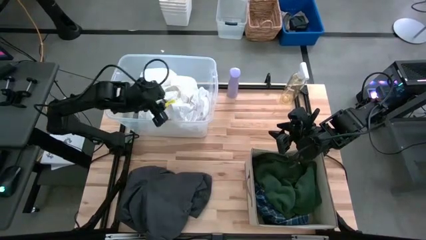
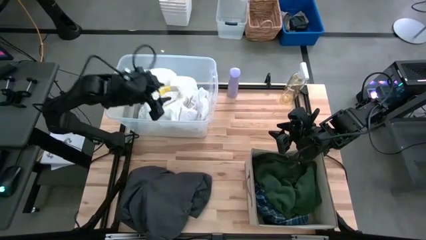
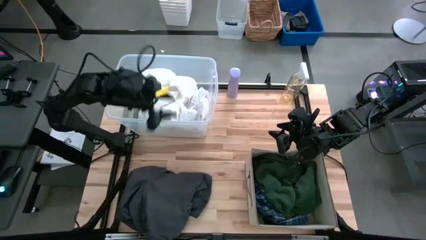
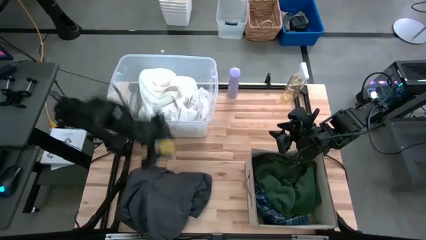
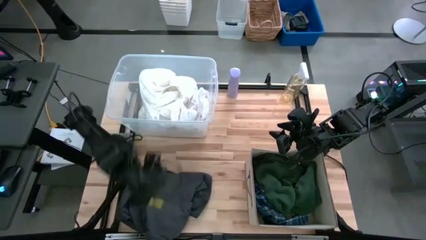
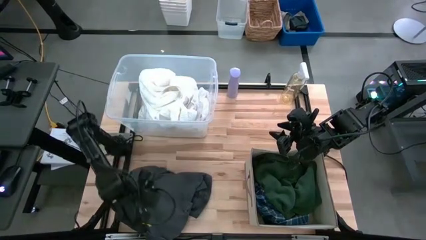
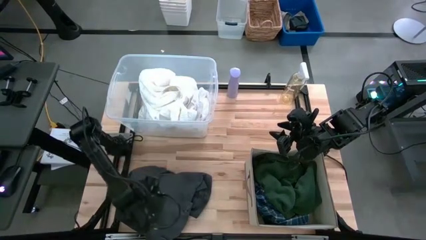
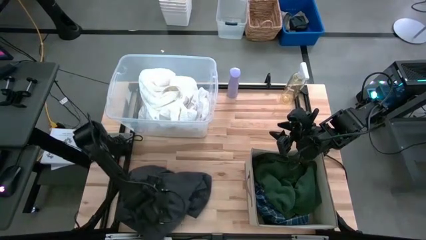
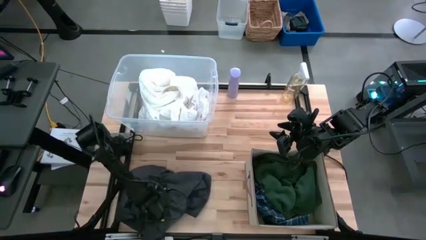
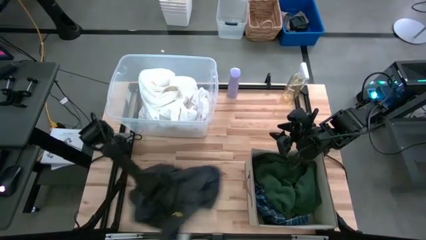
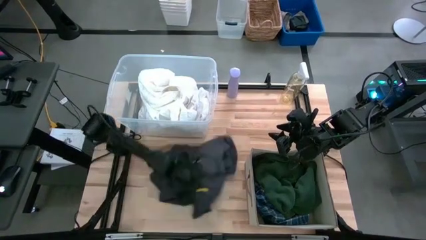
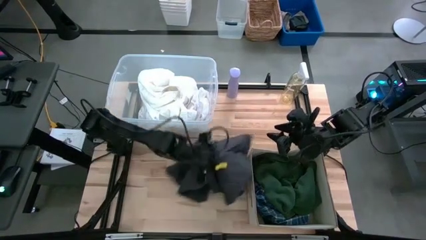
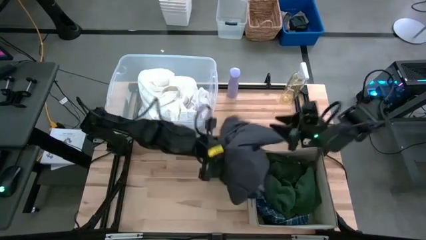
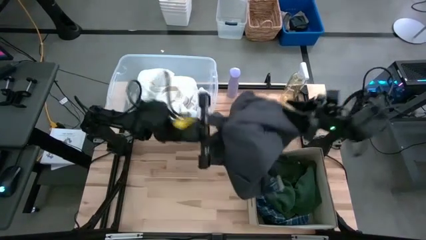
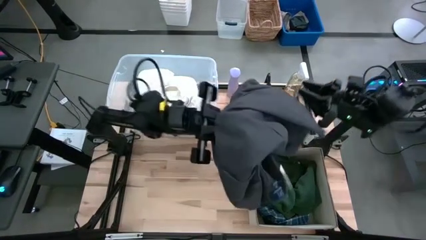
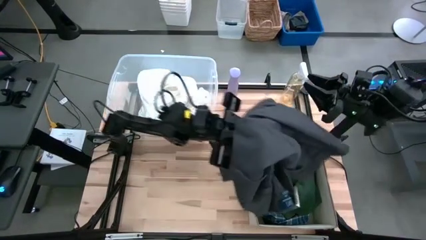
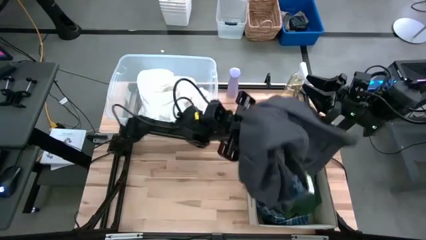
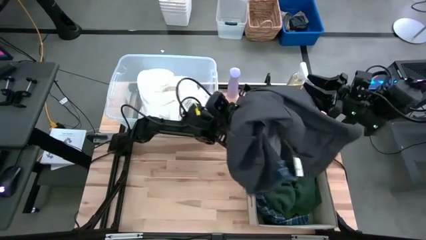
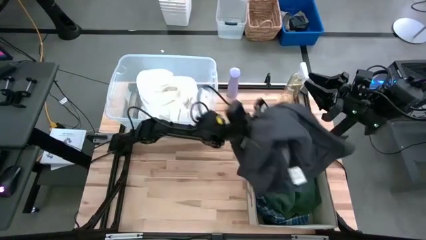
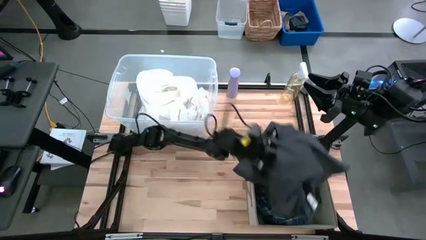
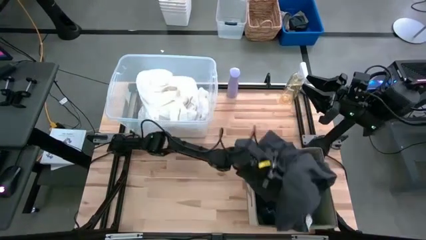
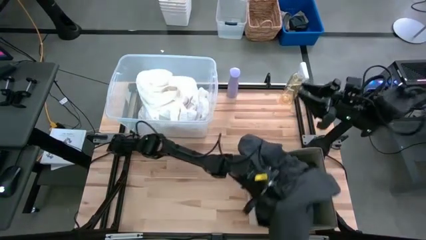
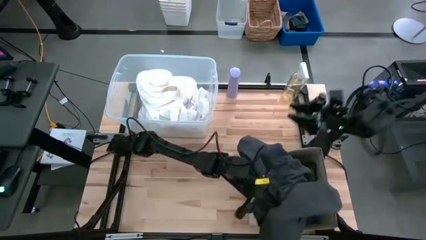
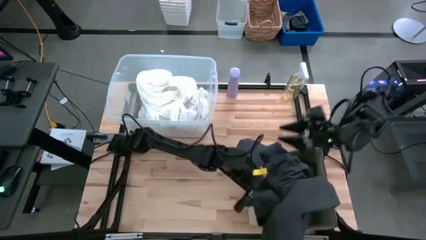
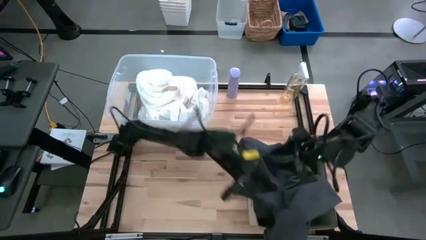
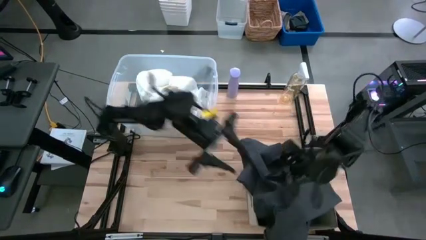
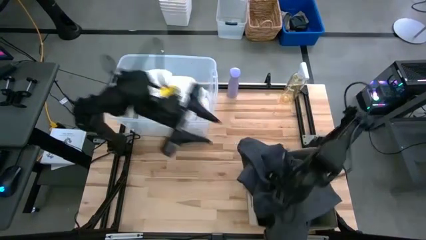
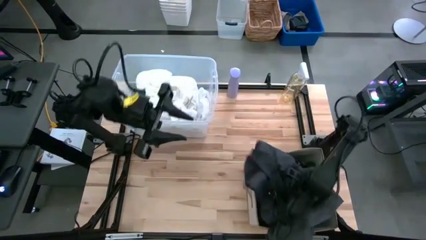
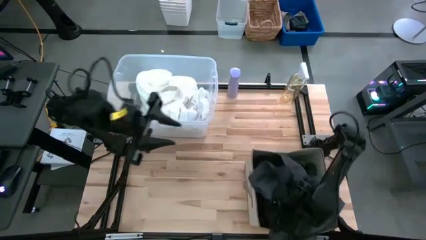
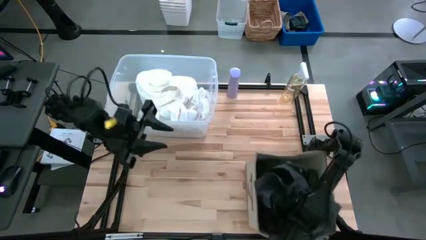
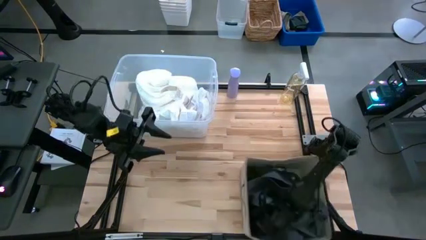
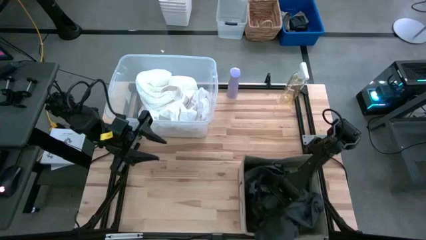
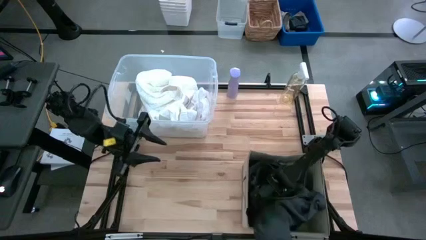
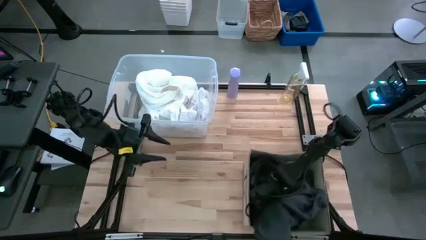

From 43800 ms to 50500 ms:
Task: Sort clothes
Put the black long sleeve into the laundry bin

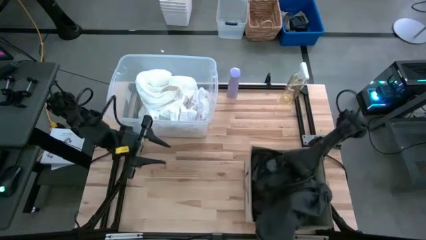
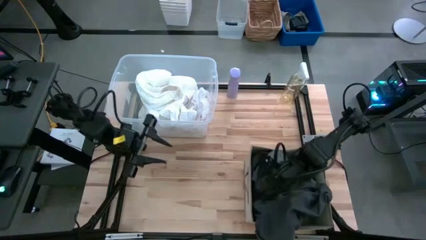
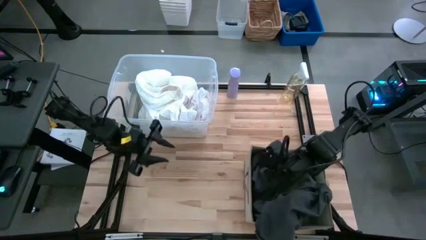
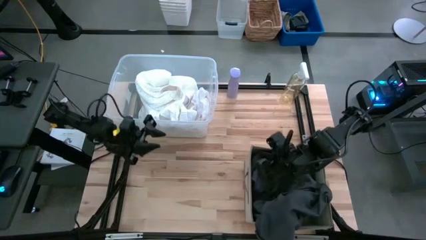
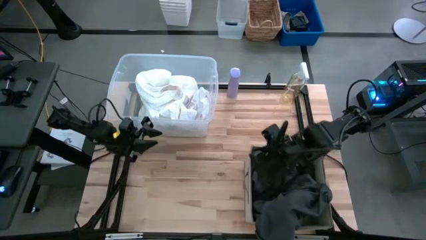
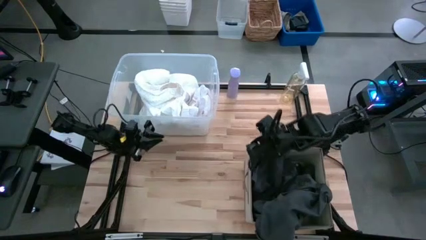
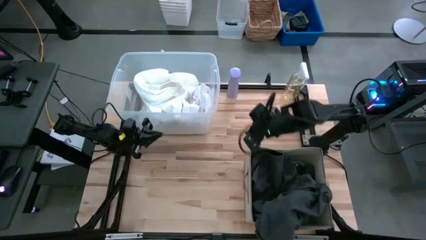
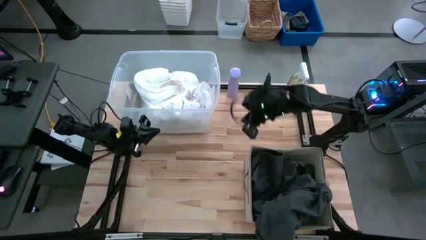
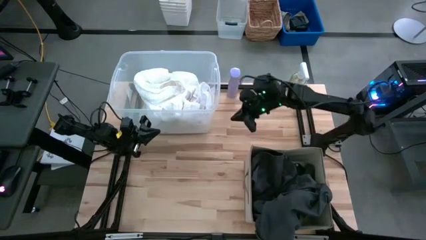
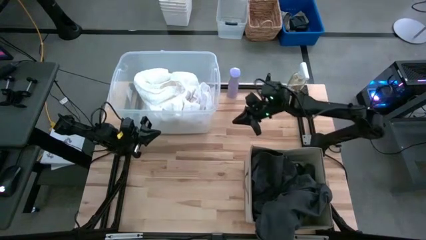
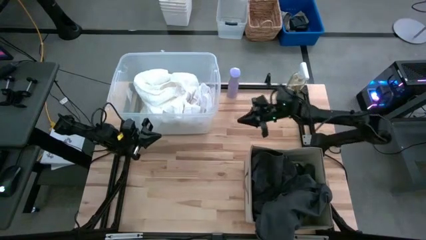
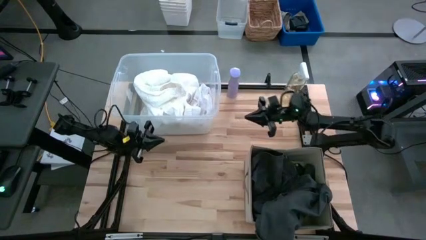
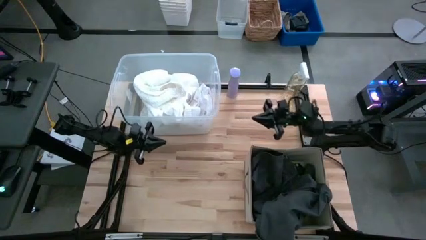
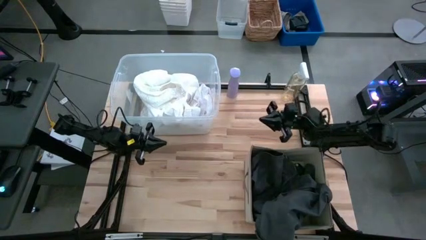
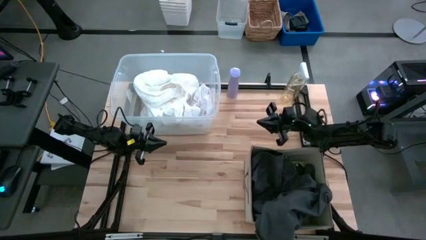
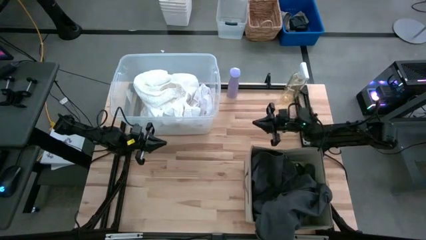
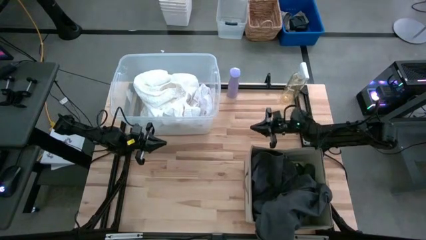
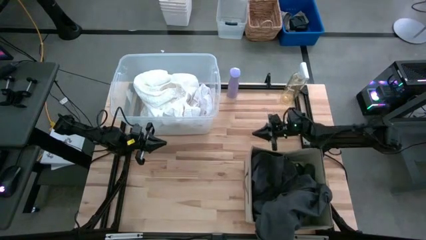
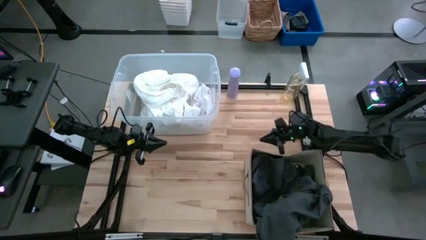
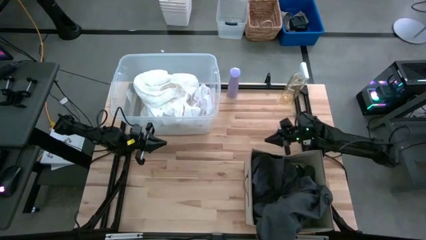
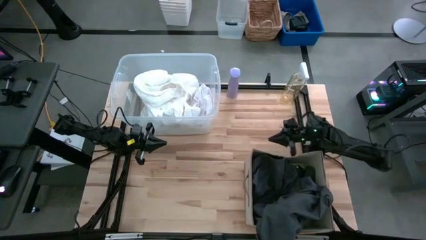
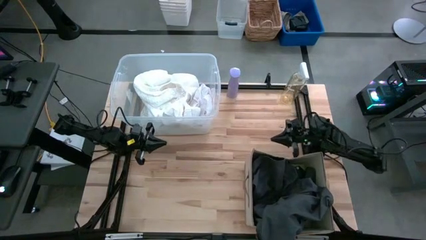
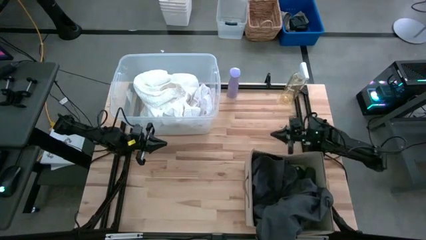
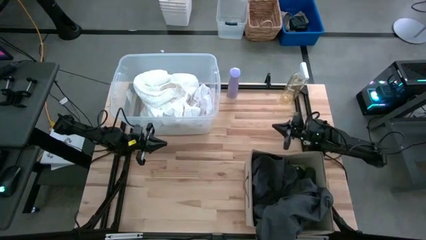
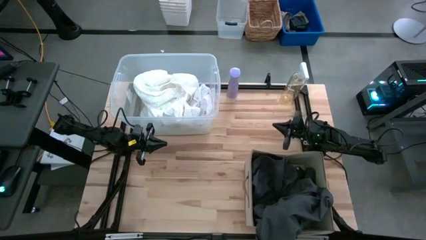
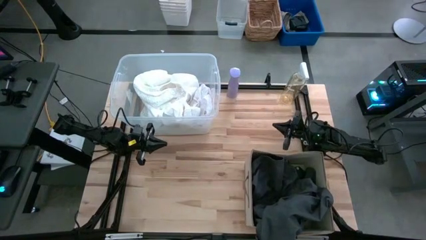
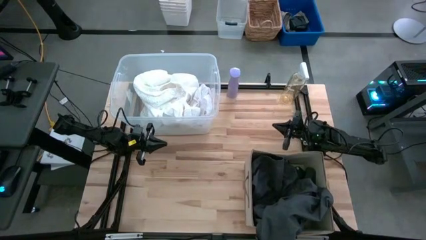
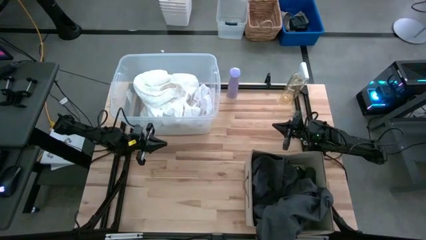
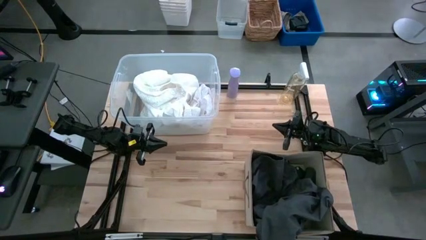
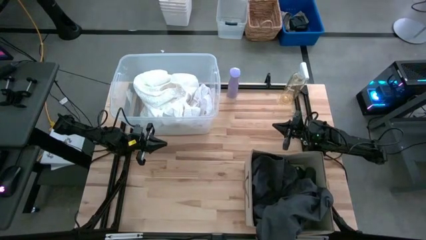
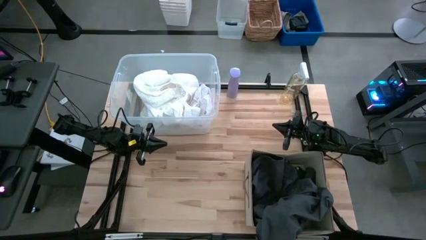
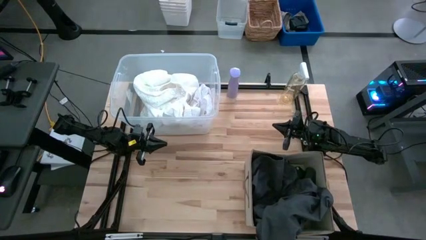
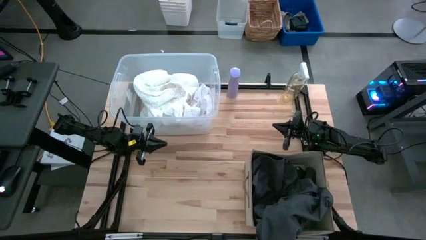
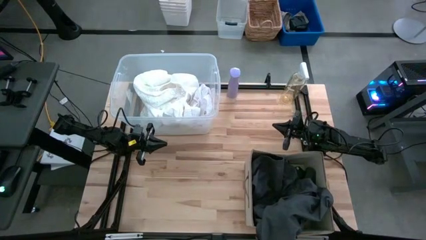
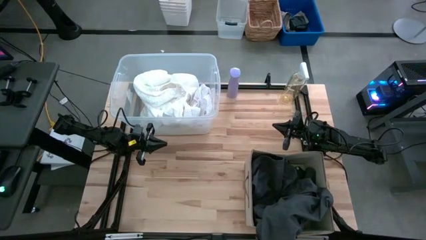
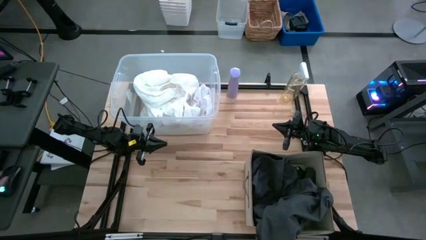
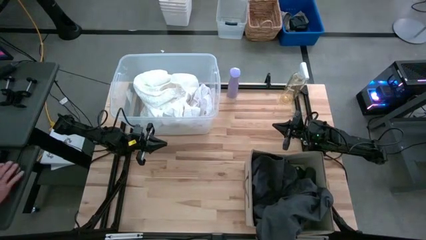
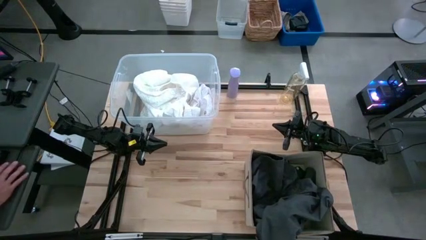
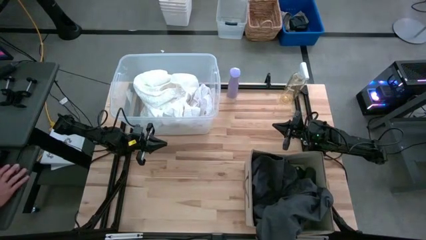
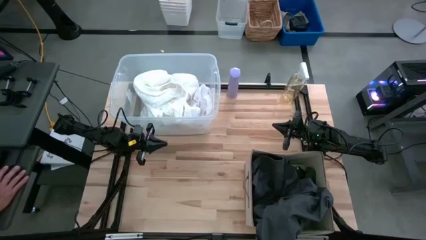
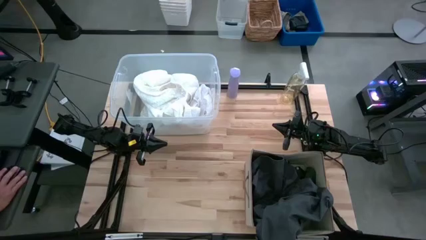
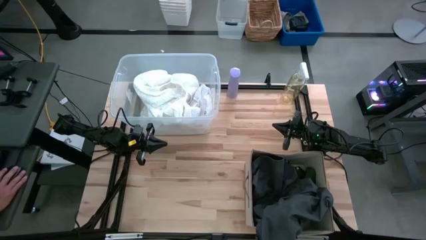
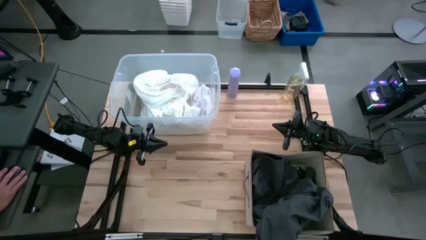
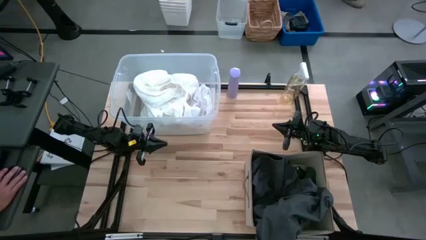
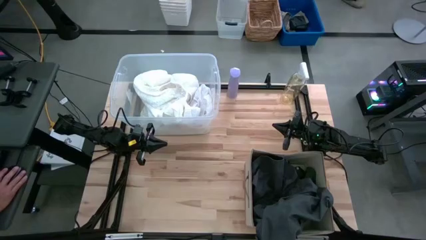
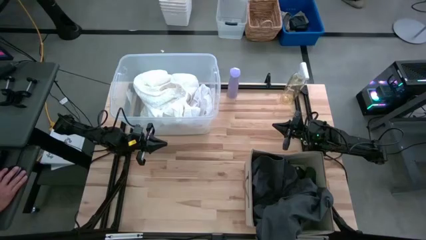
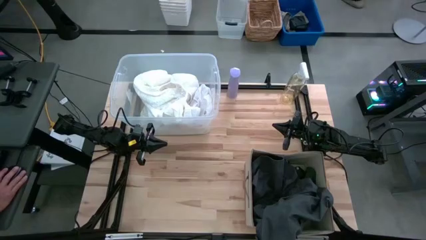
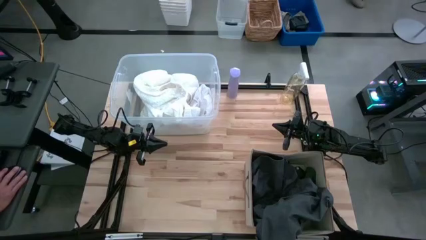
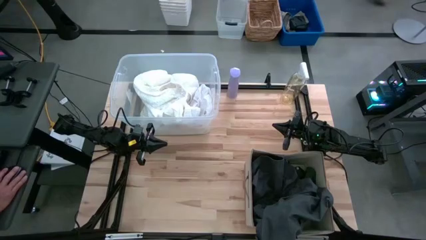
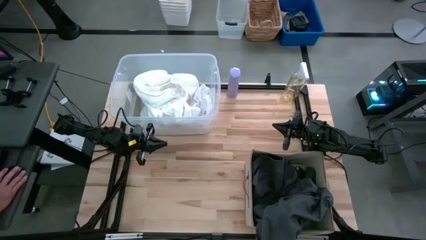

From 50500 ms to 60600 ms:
Return to Home Position
